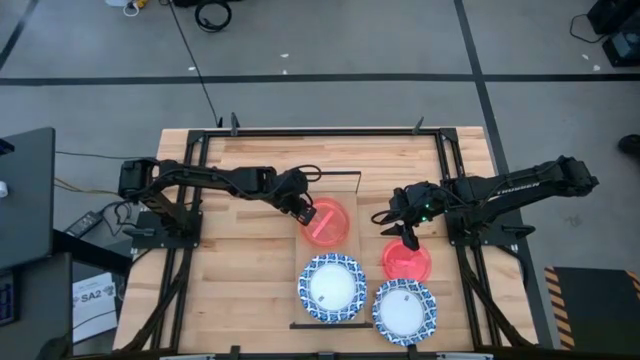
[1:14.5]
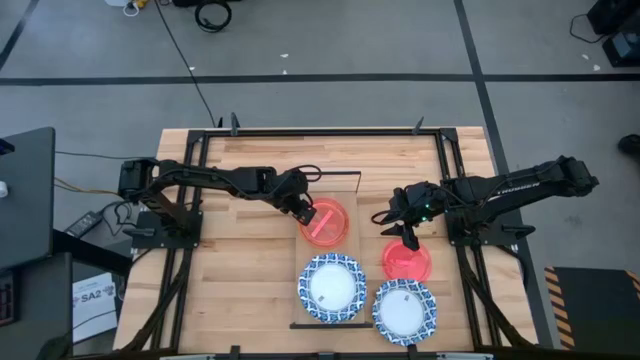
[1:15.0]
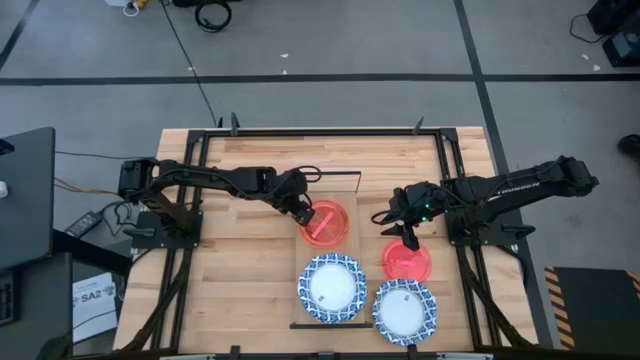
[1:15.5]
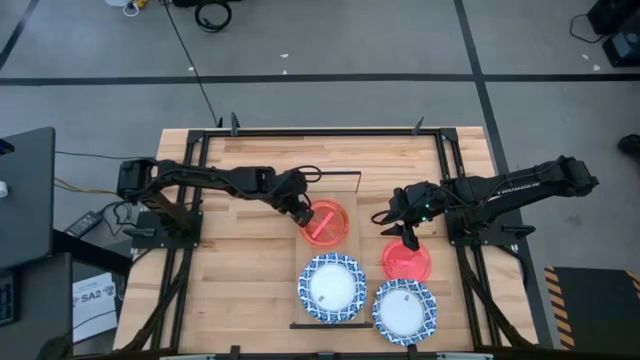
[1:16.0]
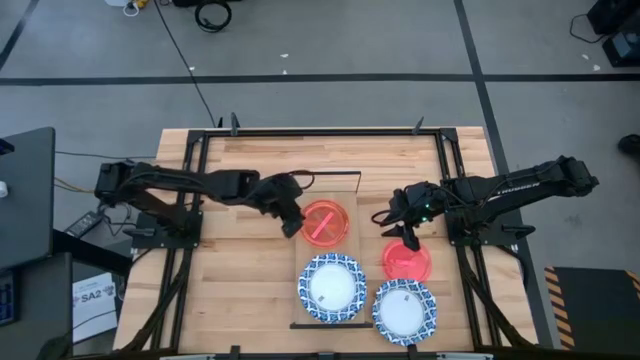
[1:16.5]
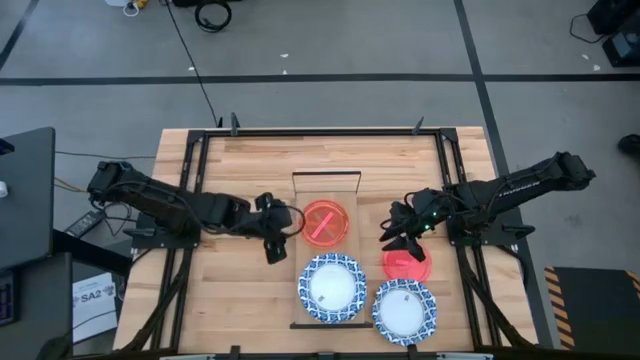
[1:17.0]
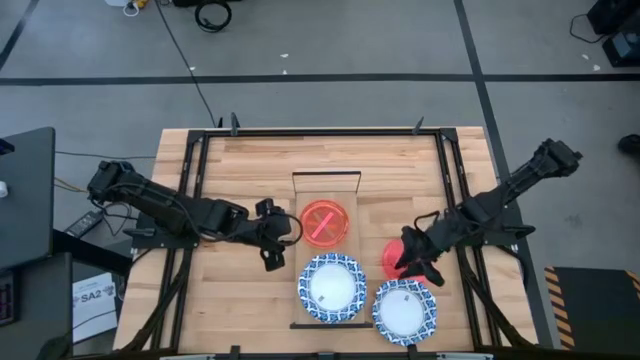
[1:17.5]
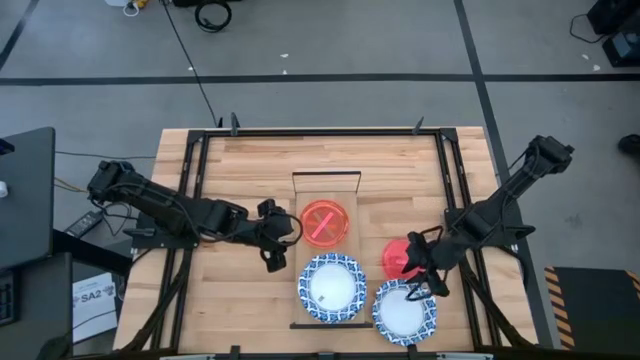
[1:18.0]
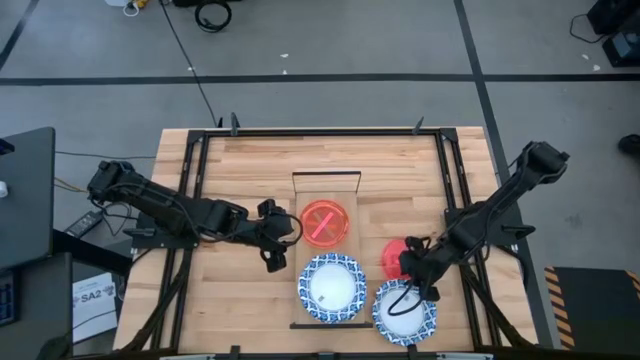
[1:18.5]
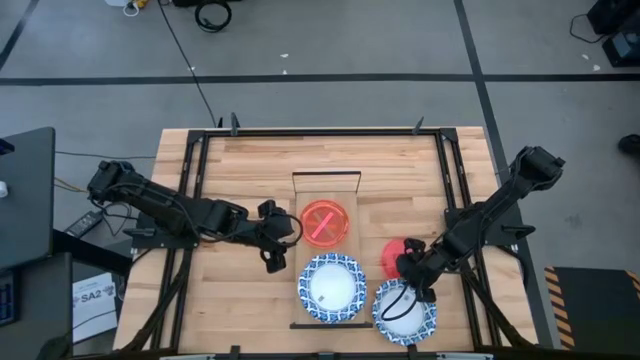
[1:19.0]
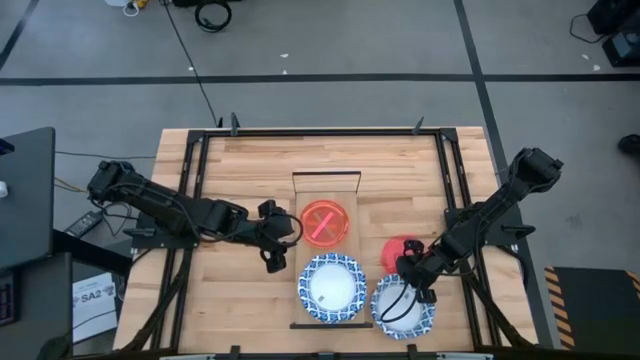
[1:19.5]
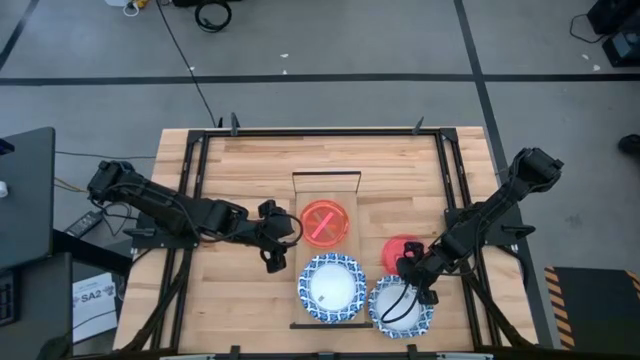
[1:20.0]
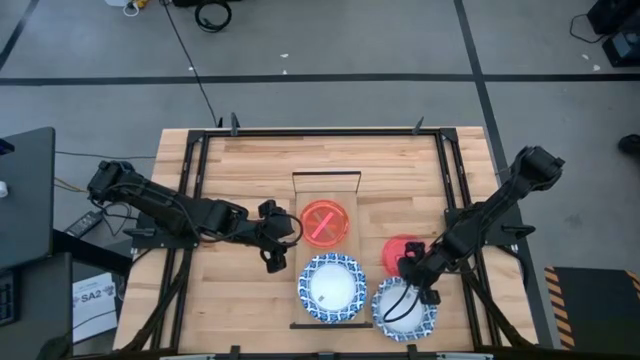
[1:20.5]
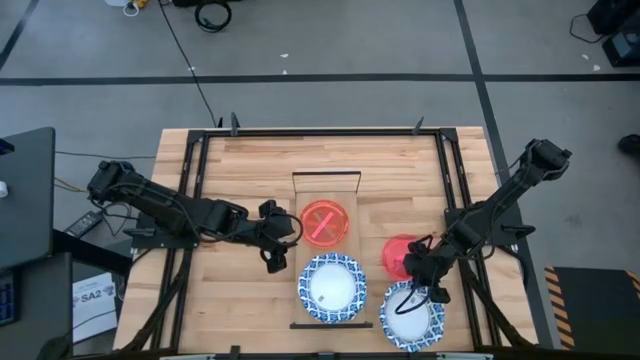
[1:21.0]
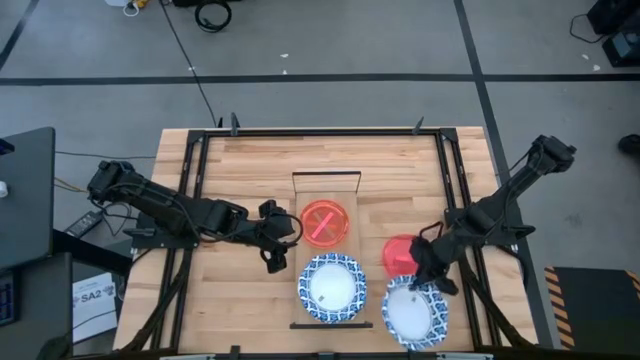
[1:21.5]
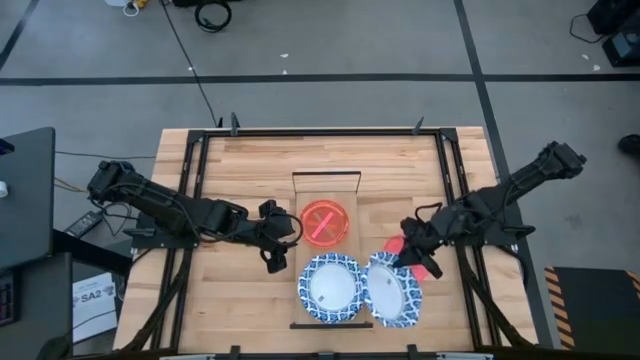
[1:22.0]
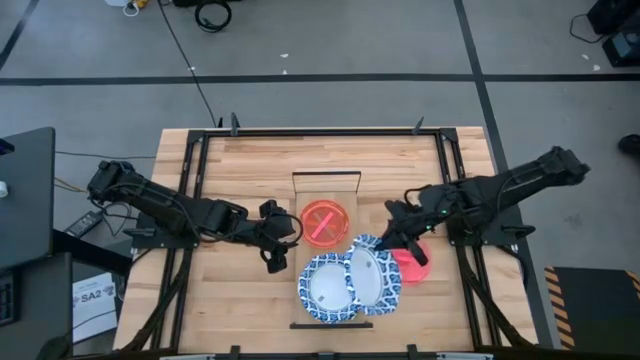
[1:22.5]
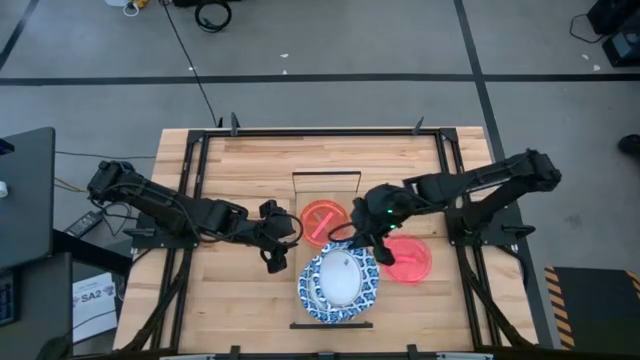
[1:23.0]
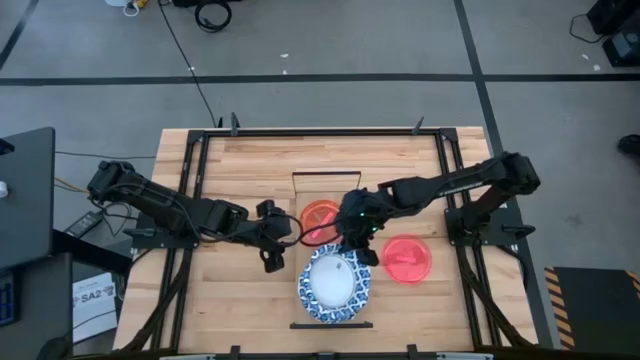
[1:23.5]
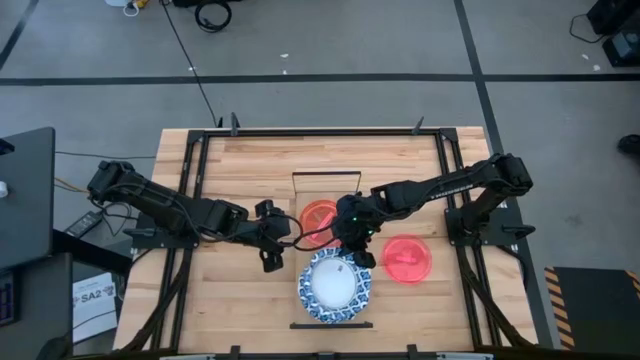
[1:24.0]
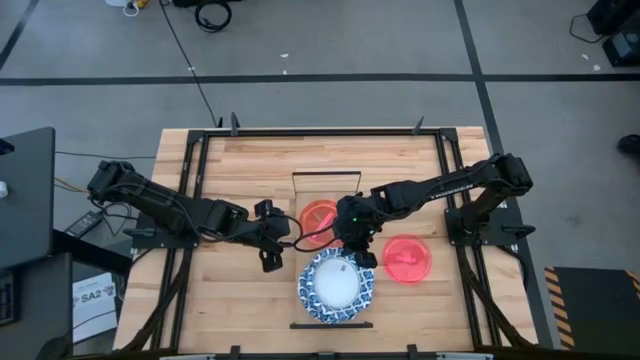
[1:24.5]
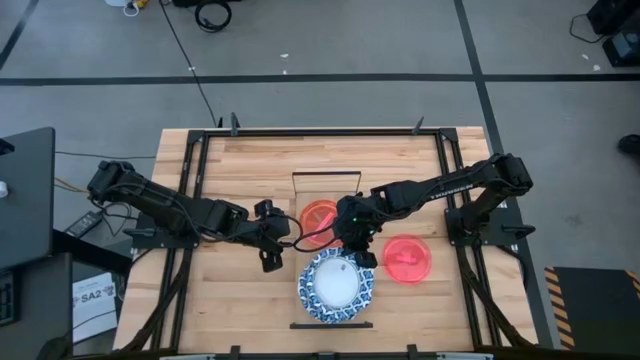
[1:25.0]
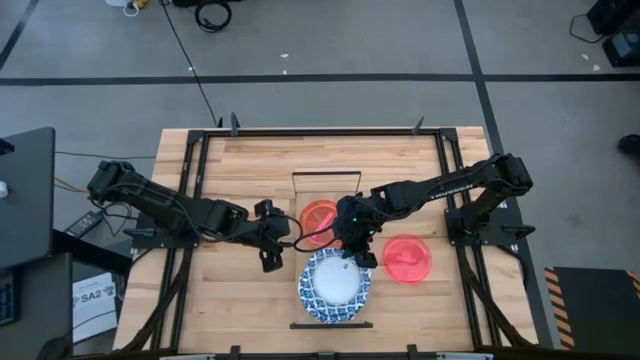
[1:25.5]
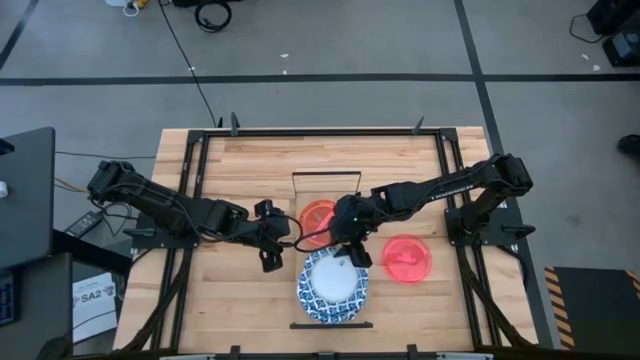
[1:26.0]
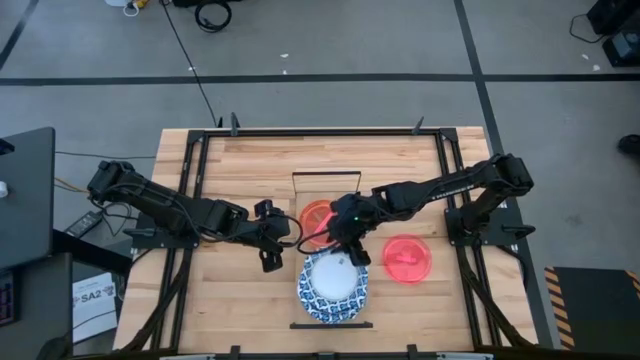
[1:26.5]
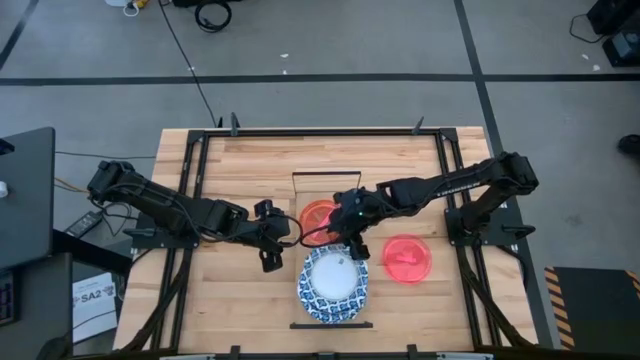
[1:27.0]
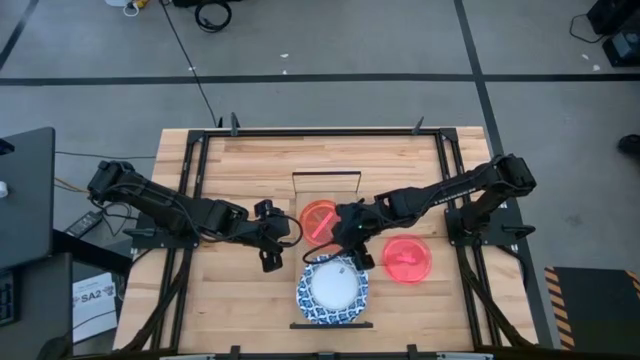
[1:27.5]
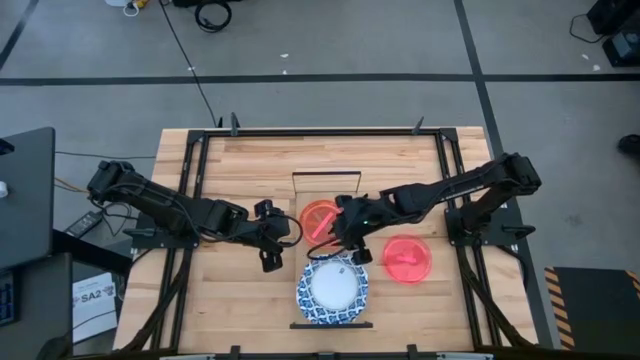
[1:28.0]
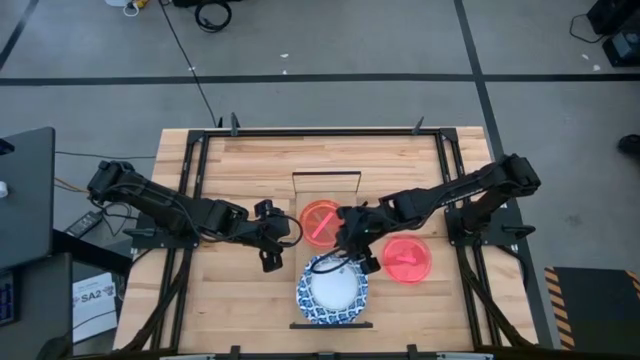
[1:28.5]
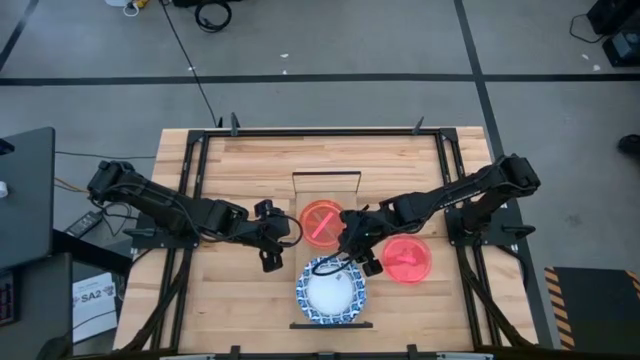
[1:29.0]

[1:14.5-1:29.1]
Task: Place and stack plates onto a shelf
Stack the blue patterned bowl on the blue patterned bowl on the shelf

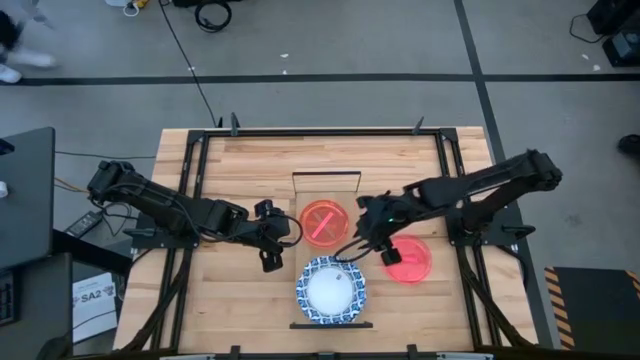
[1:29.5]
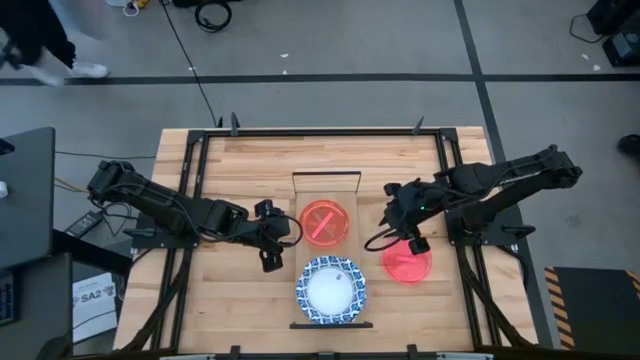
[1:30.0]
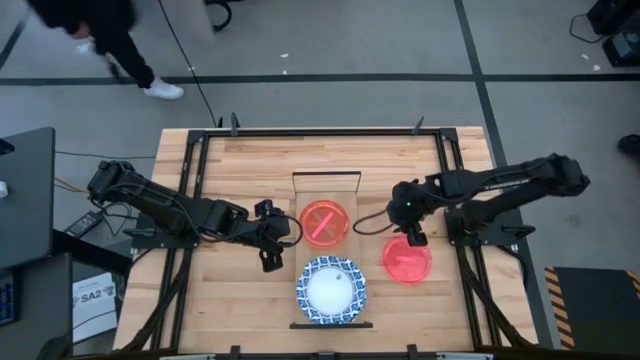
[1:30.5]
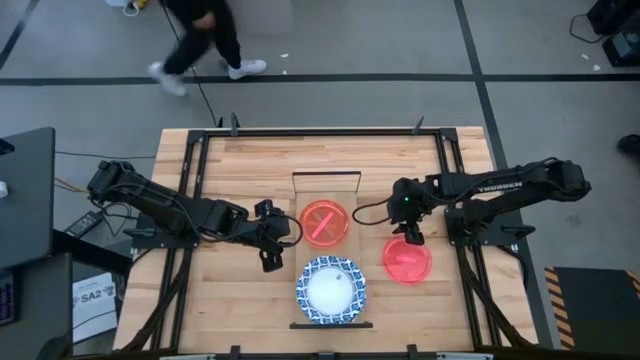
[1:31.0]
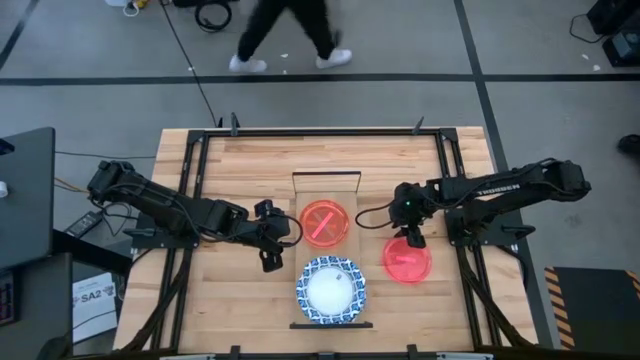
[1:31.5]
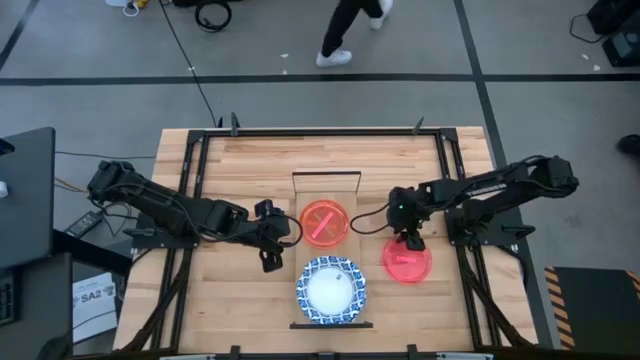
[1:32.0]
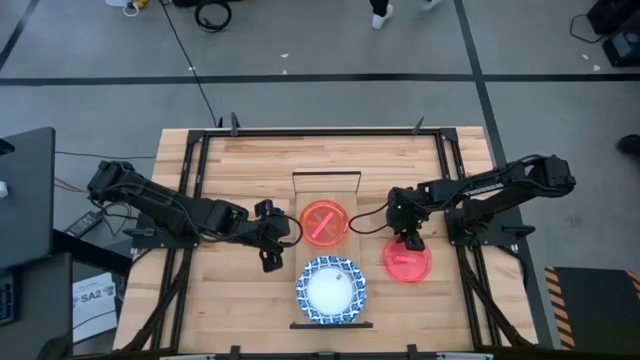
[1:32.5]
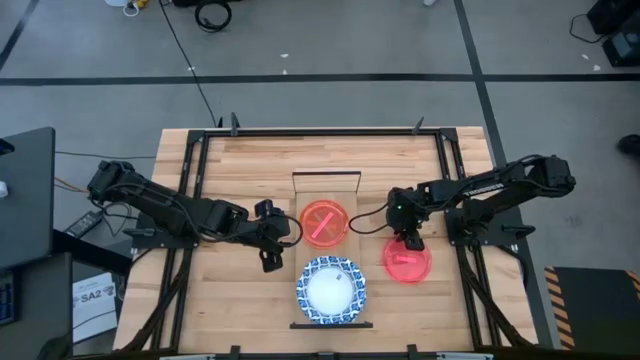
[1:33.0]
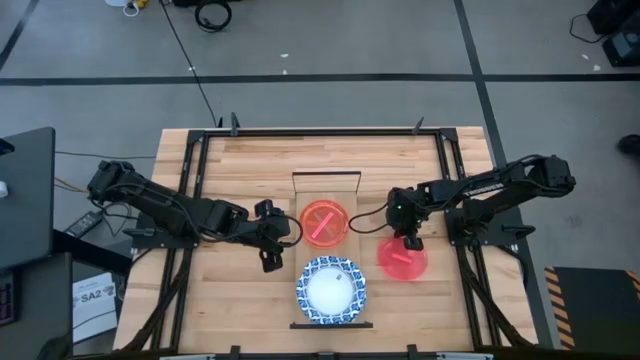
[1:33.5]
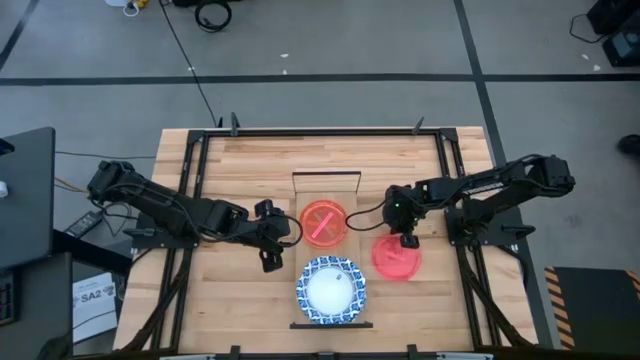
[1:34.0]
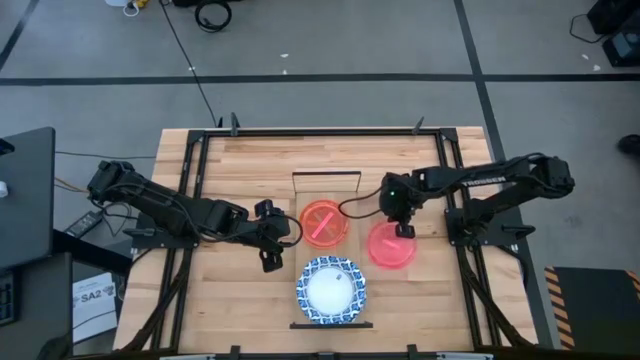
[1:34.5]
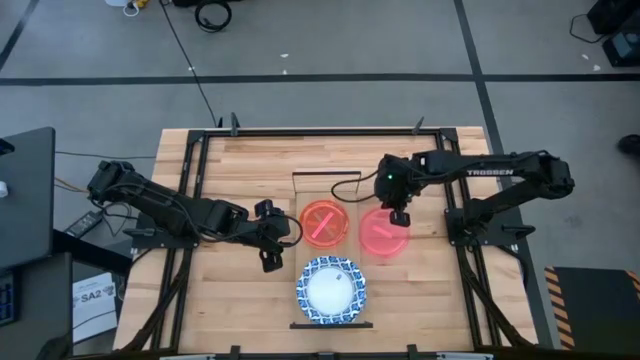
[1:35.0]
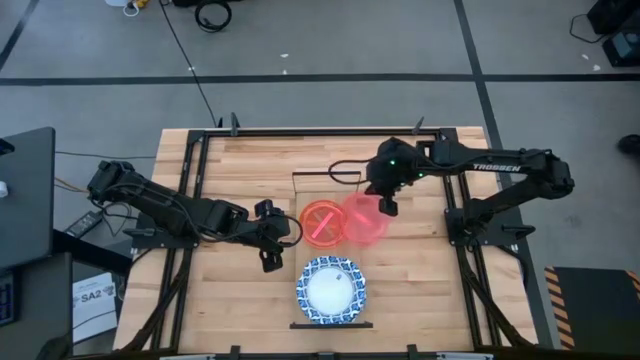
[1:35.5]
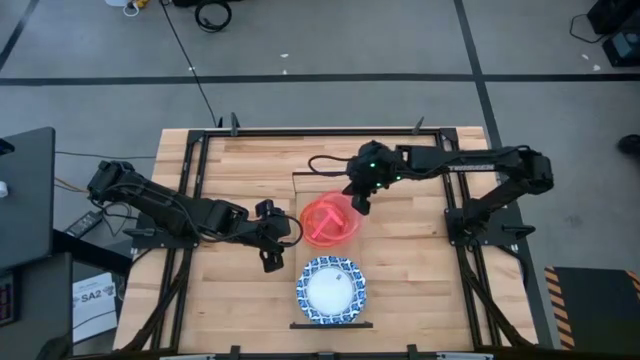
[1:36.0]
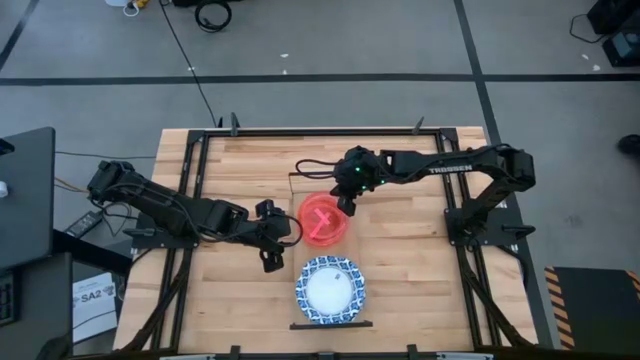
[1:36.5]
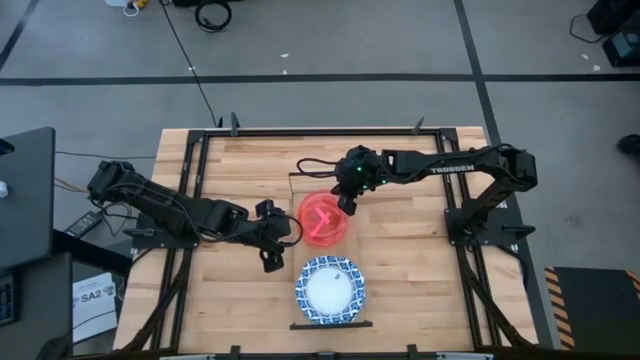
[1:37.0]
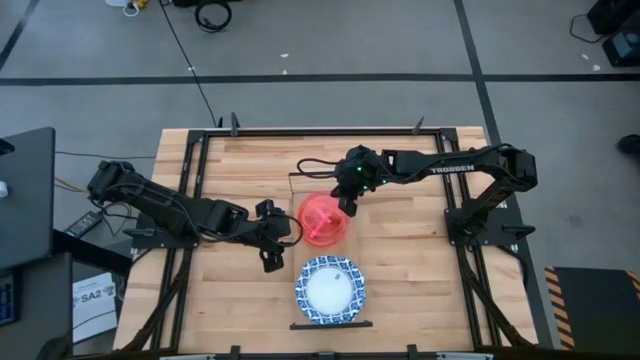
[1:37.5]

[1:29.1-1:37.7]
Stack the pink transparent plate on the pink transparent plate on the shelf
